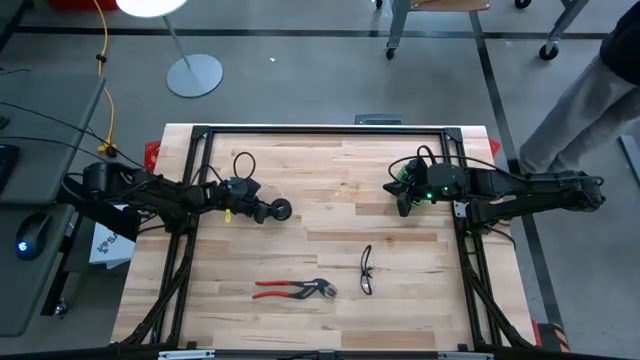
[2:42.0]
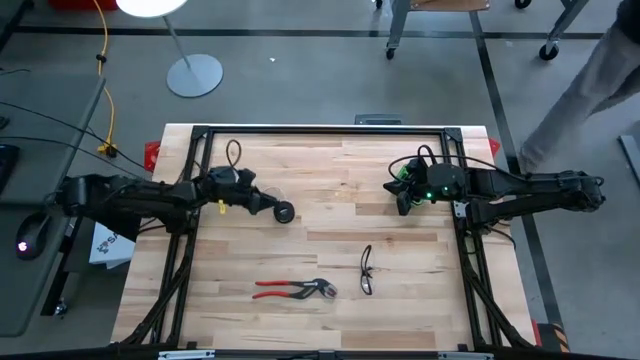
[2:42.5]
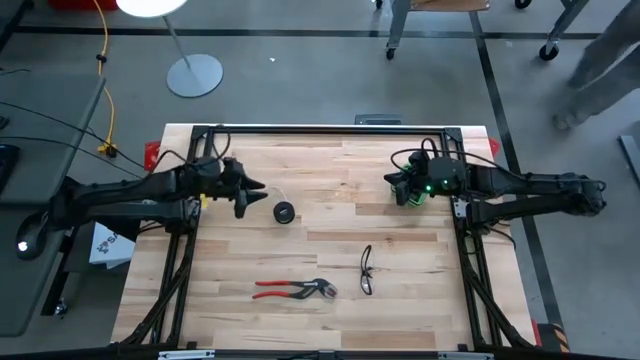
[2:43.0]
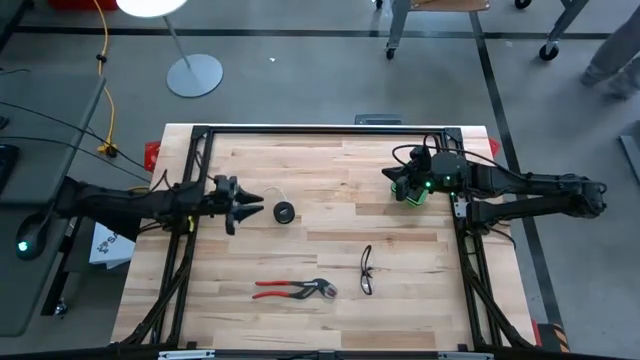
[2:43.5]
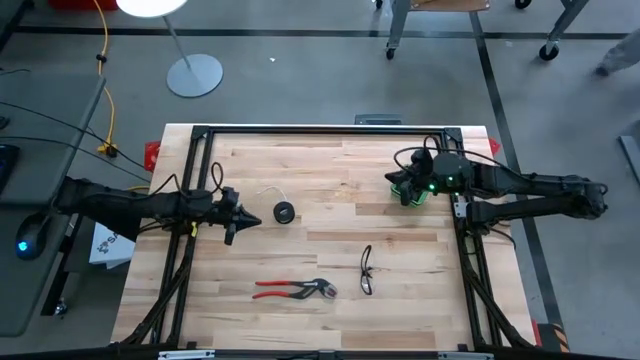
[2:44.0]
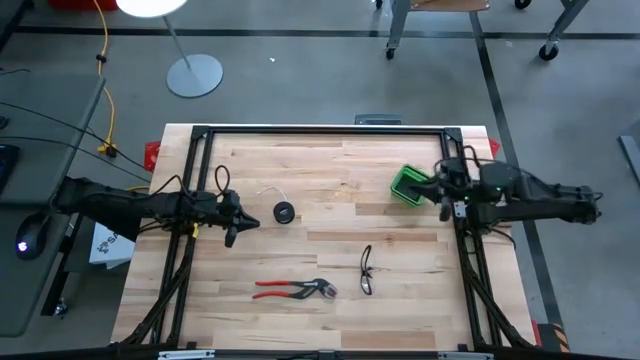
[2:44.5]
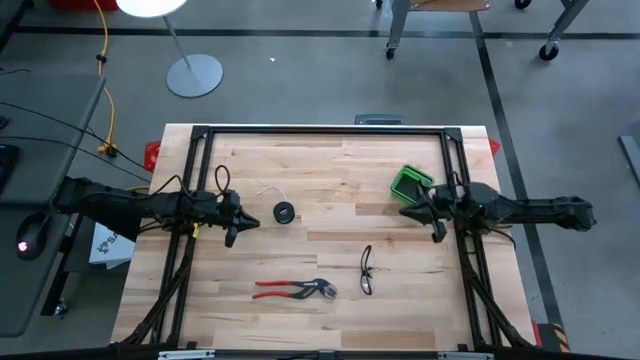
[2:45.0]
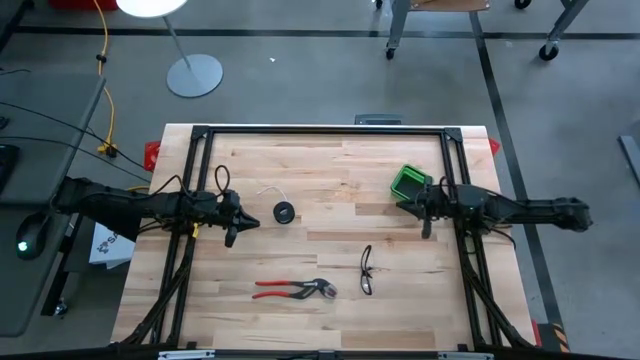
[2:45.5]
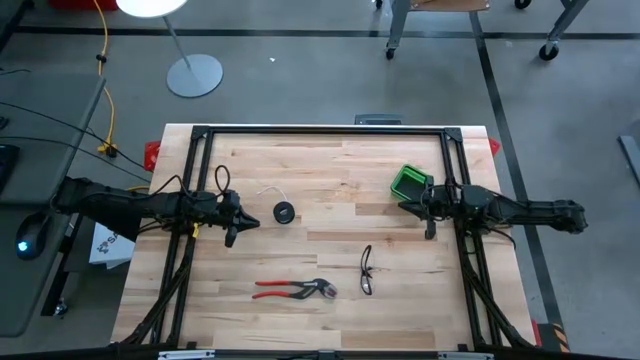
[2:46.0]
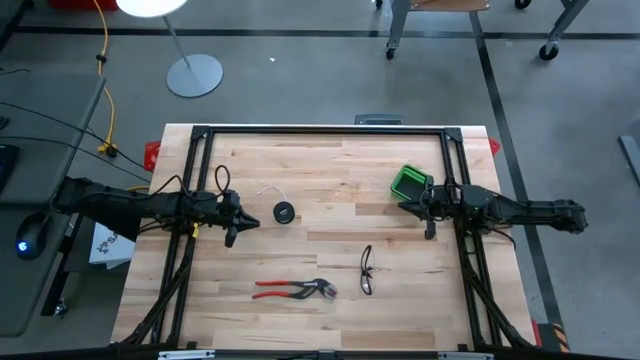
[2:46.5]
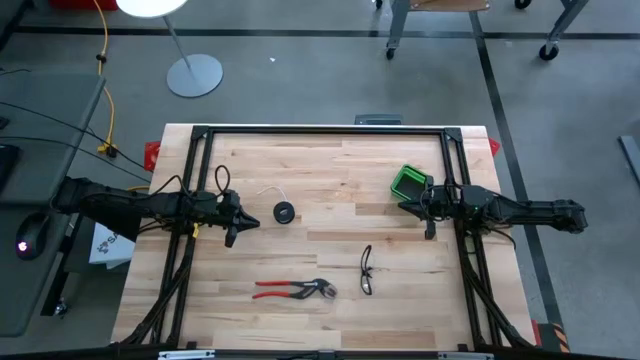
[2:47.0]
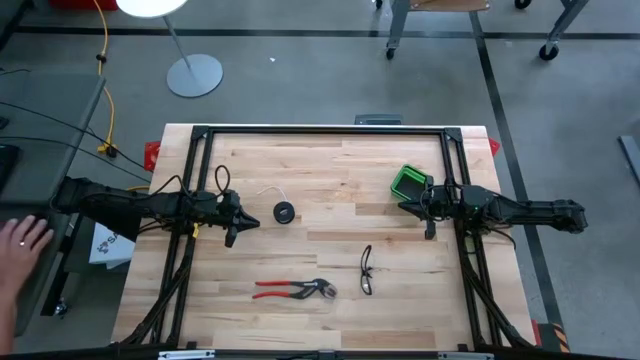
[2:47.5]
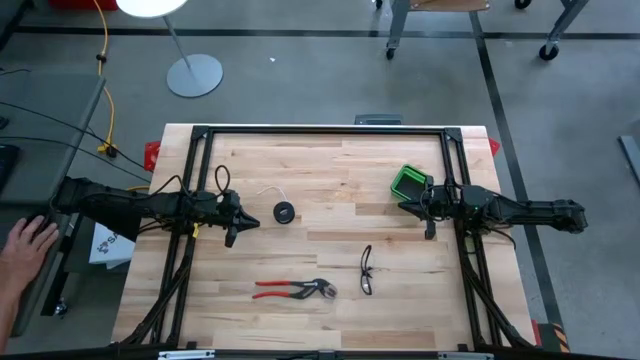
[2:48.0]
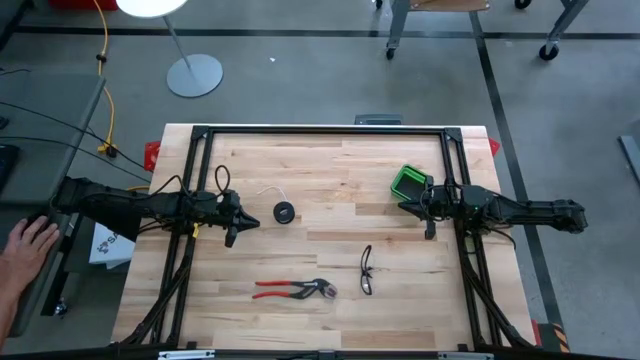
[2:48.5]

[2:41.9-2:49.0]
Task: Coil cords
Return to Home Position

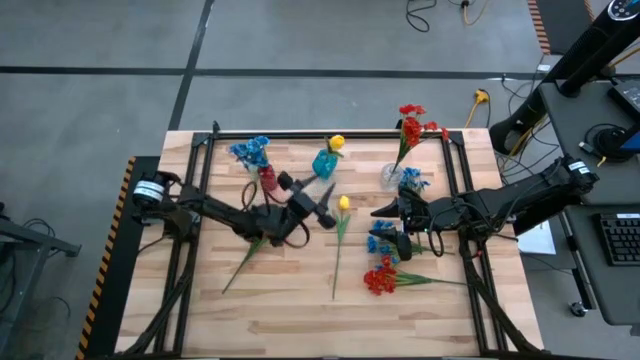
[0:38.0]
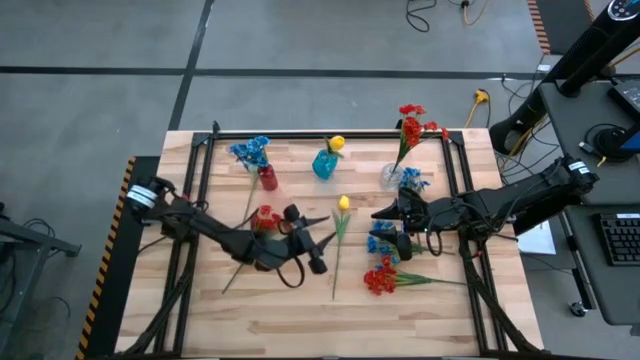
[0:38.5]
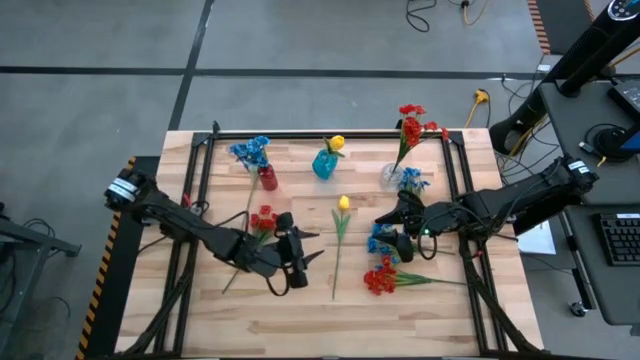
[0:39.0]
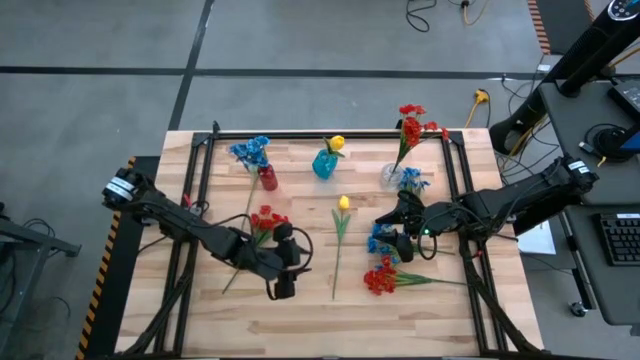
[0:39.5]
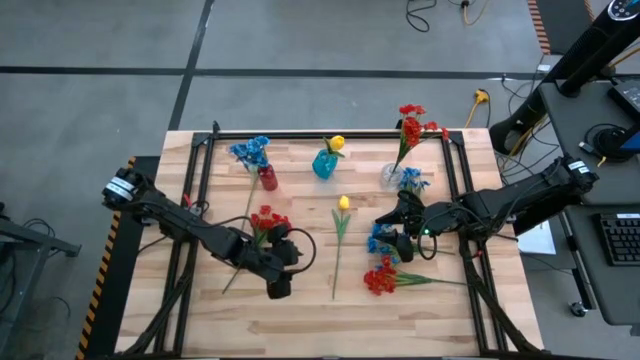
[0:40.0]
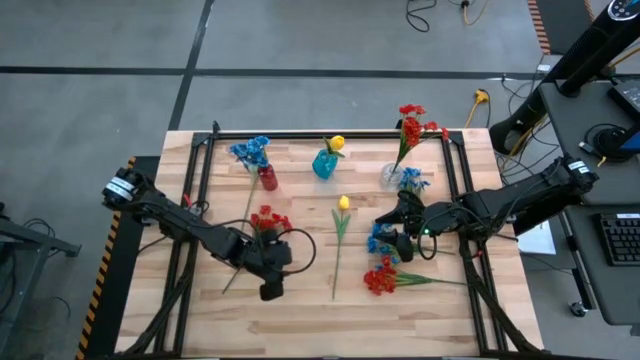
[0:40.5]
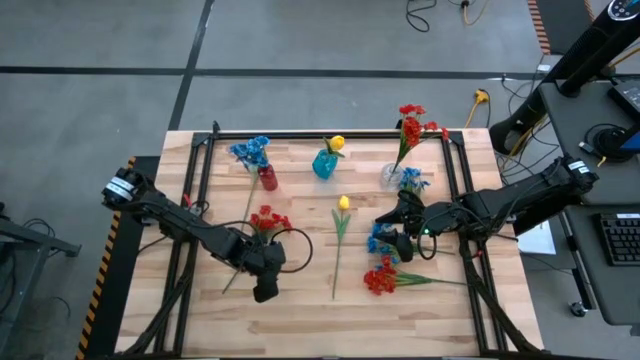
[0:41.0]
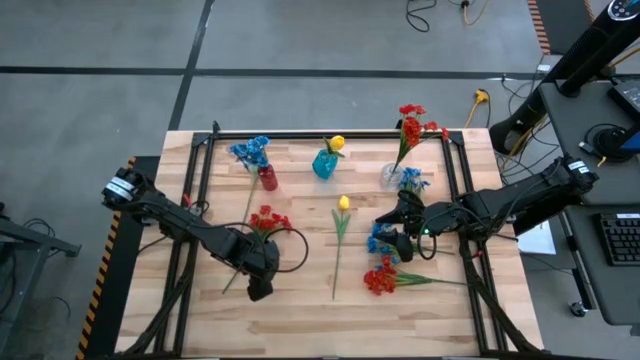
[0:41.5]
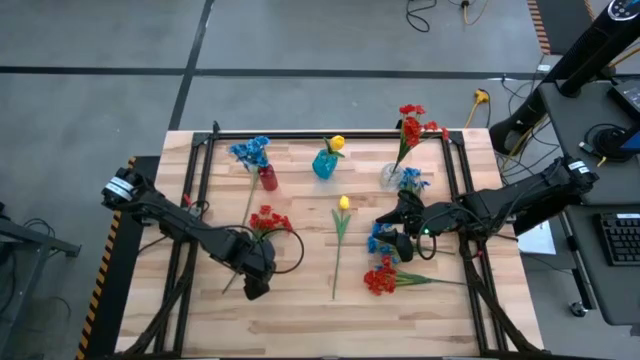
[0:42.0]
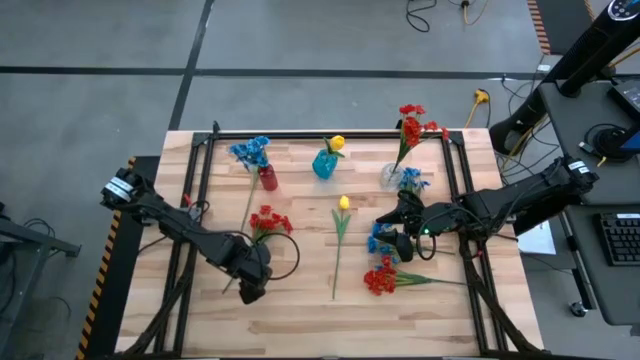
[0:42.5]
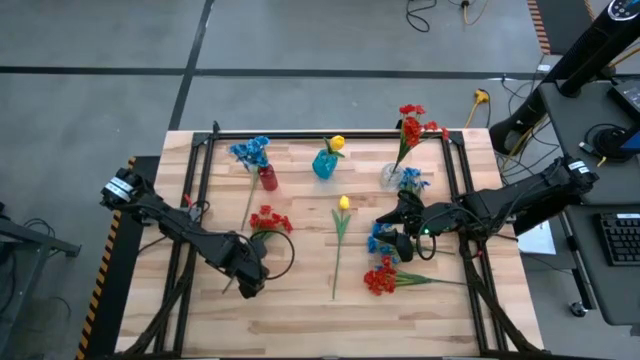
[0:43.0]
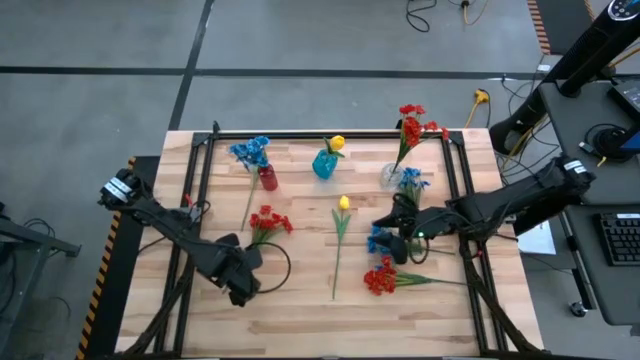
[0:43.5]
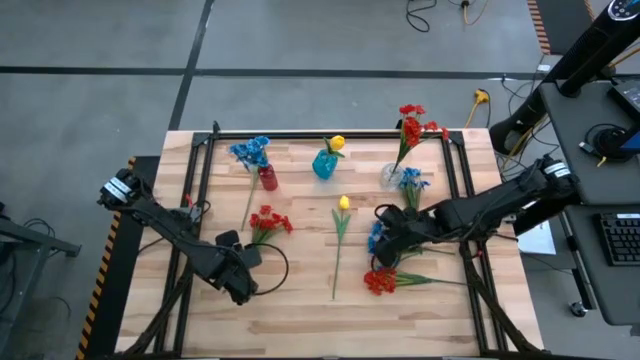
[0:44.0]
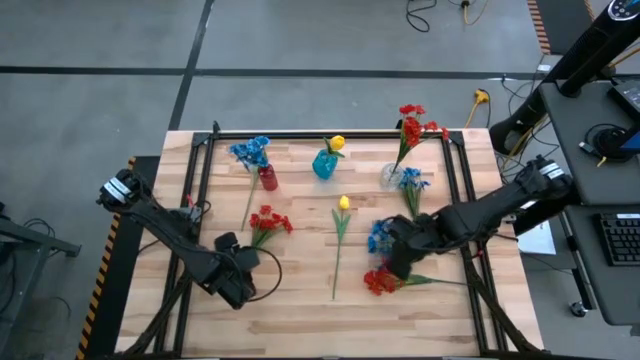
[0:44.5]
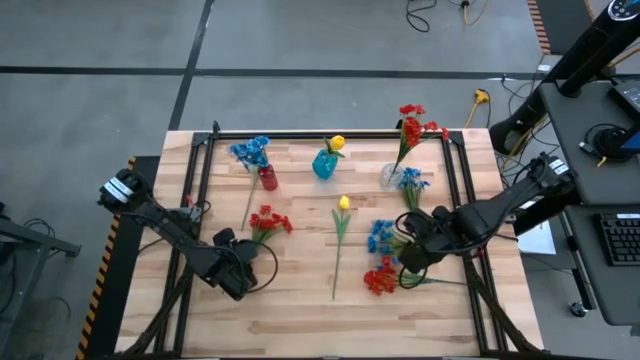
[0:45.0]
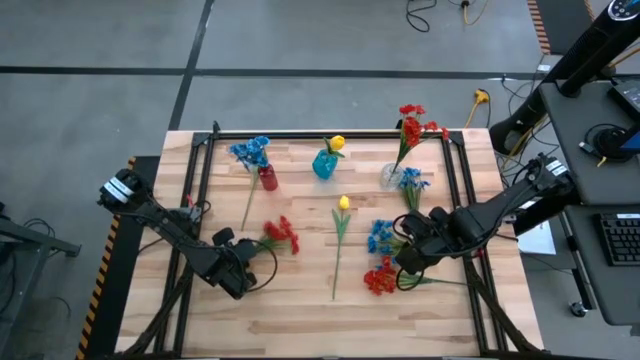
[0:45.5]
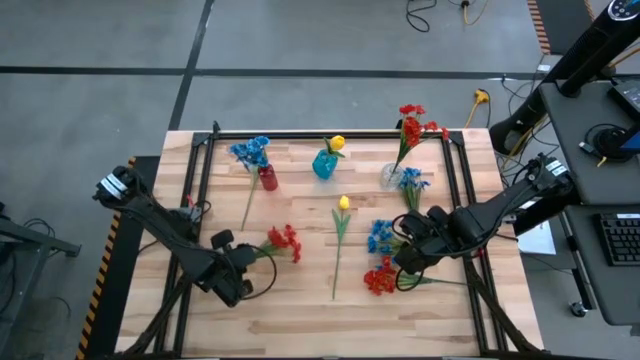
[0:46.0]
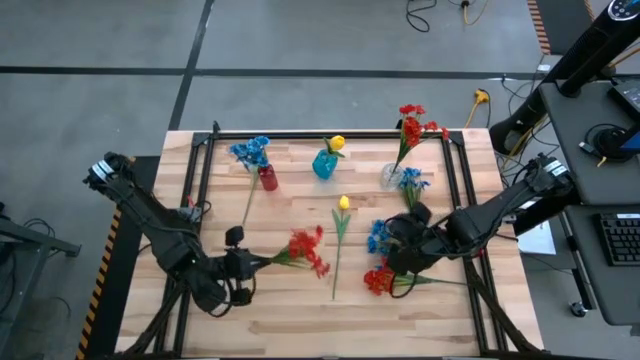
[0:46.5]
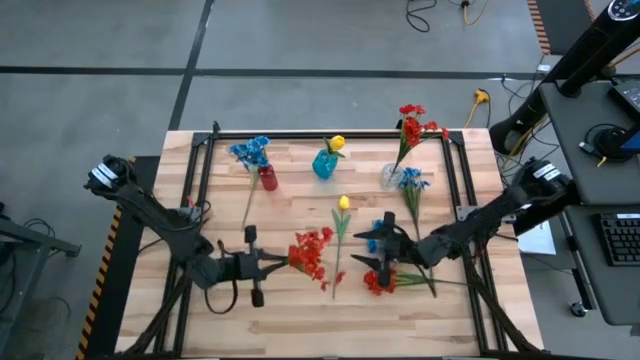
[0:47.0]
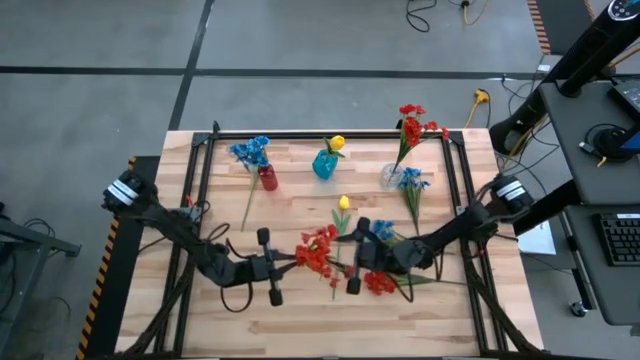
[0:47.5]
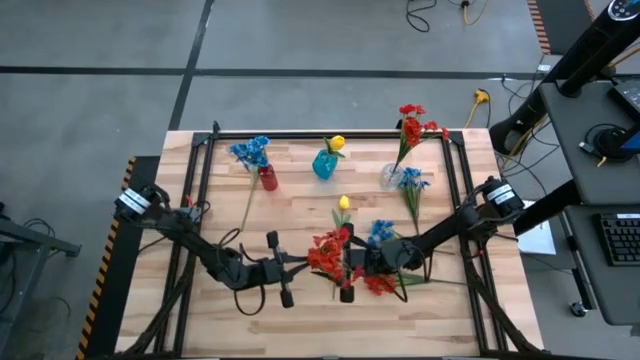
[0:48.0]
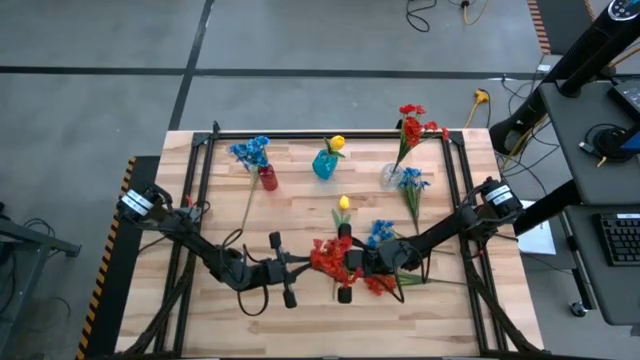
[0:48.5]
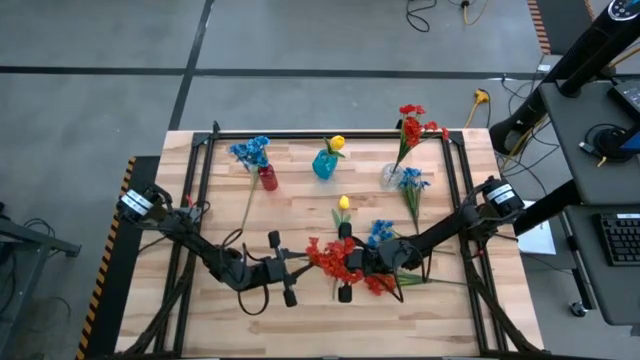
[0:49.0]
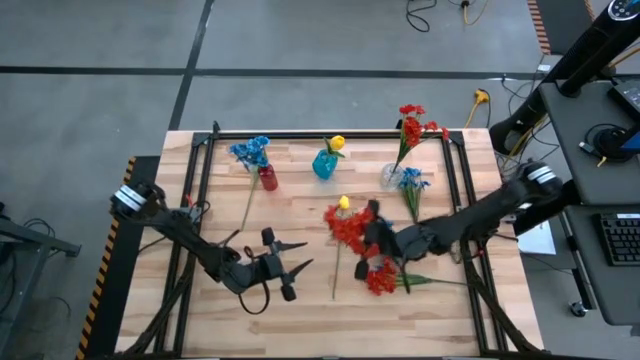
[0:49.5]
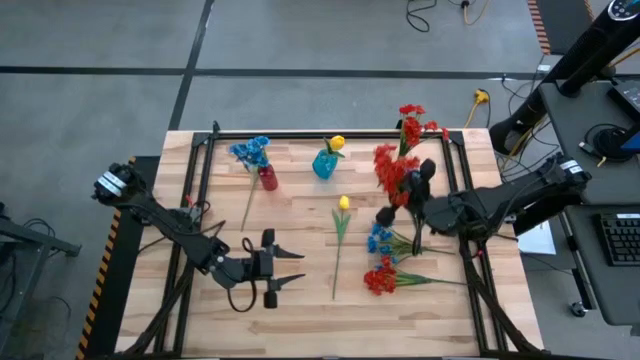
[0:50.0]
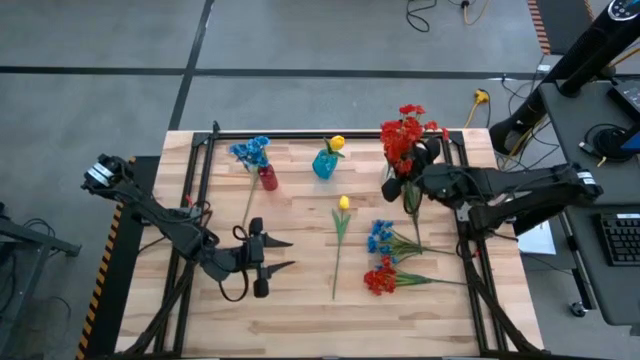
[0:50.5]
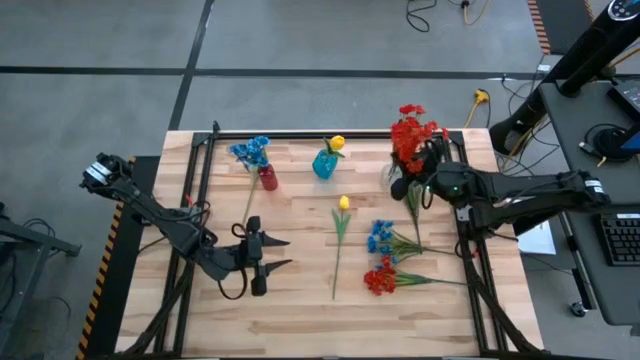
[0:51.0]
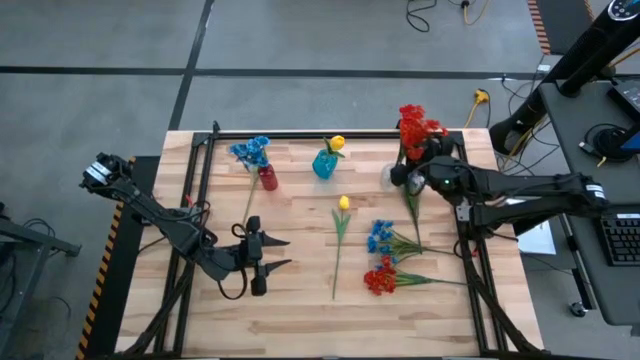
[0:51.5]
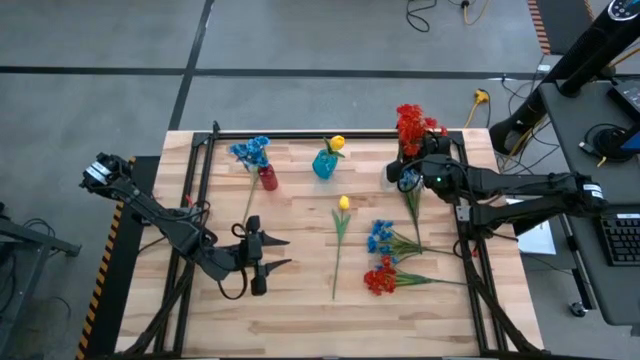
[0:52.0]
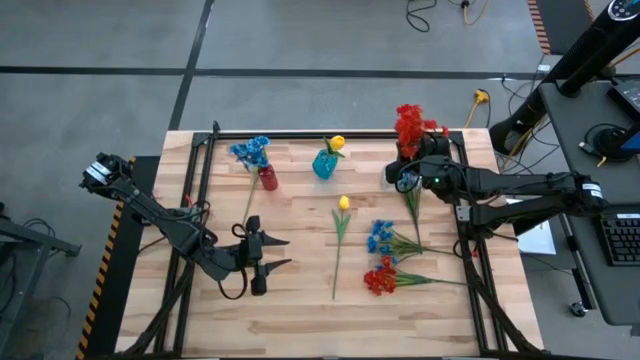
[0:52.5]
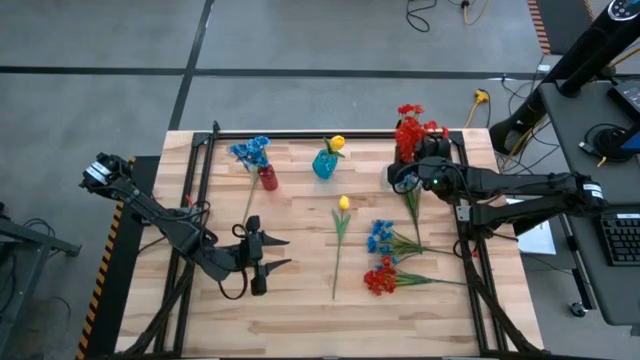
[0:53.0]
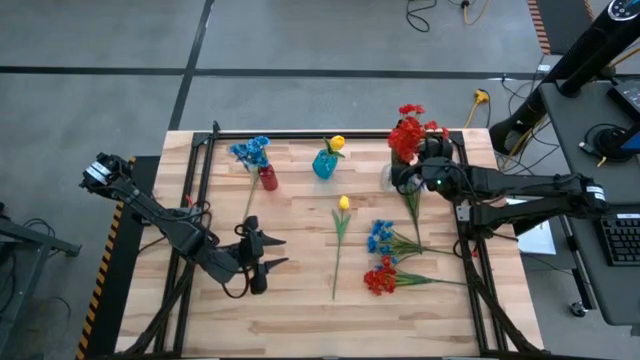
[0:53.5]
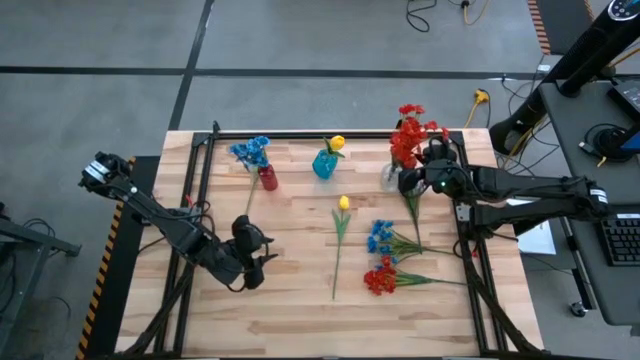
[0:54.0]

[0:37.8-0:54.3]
Task: Sort flowers into vase by color
Put the left red flower into the transparent vase
